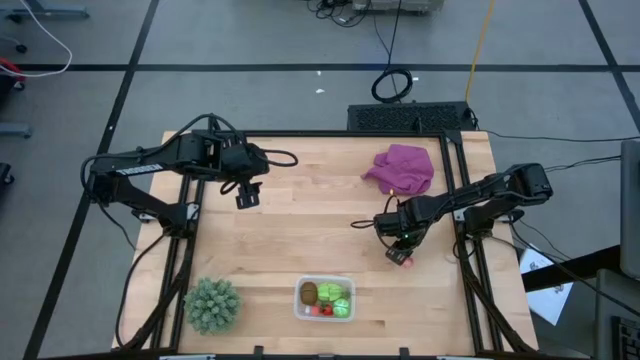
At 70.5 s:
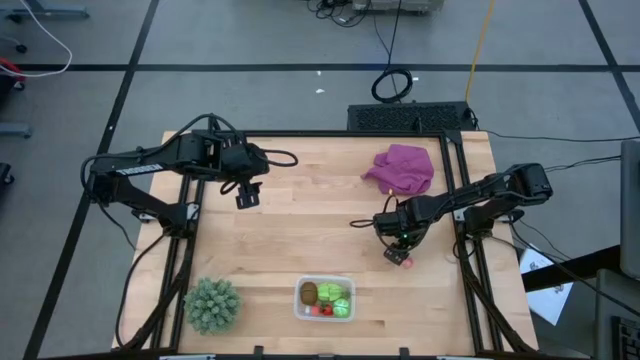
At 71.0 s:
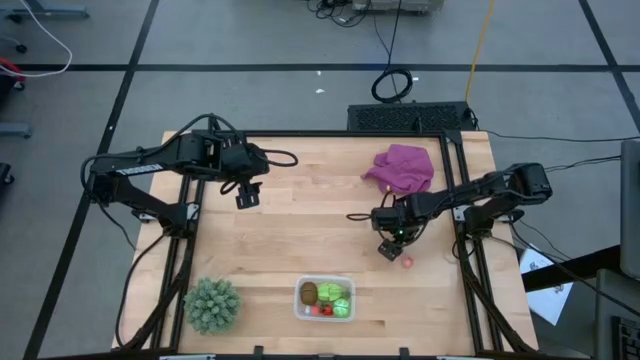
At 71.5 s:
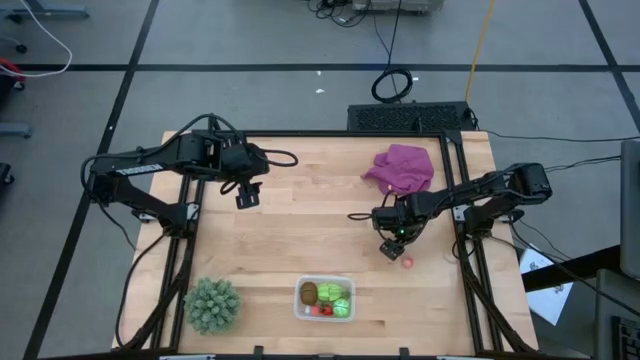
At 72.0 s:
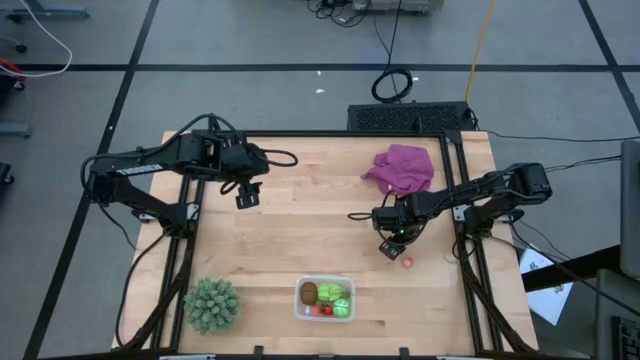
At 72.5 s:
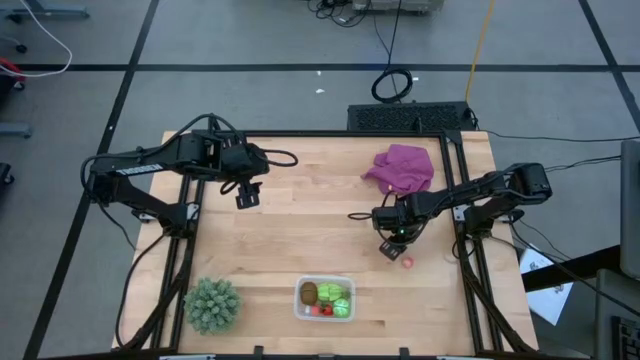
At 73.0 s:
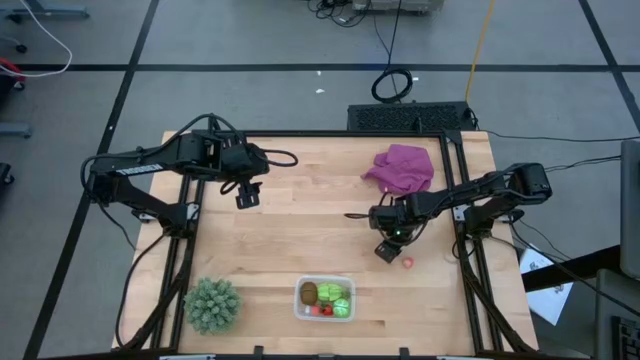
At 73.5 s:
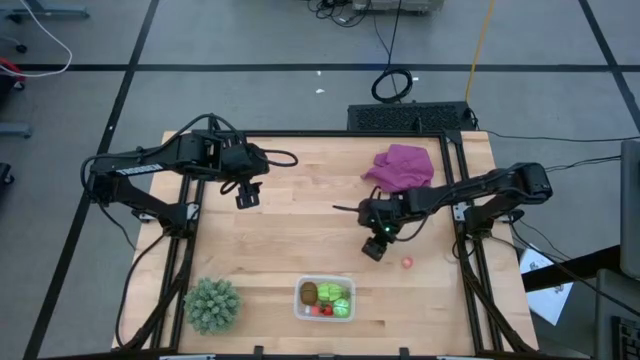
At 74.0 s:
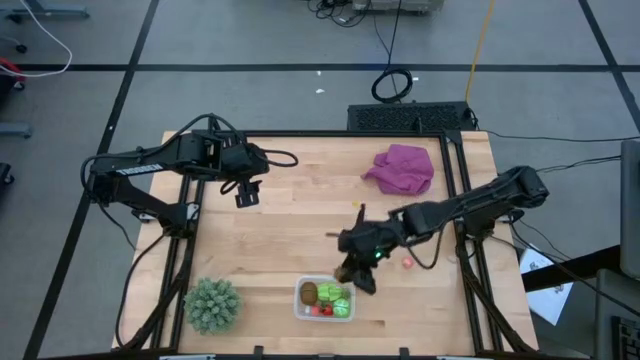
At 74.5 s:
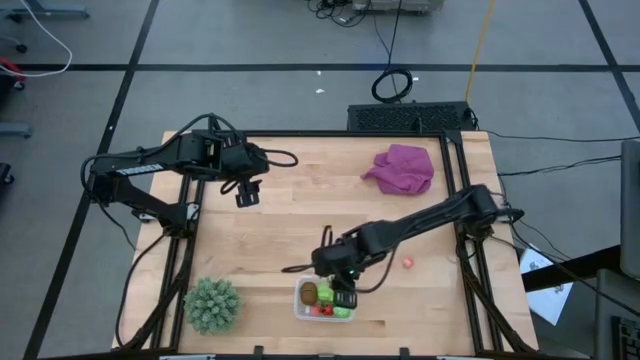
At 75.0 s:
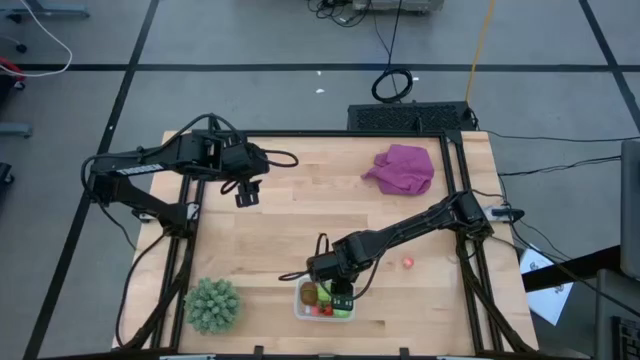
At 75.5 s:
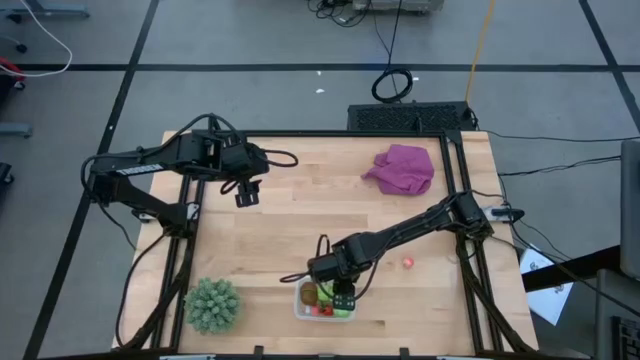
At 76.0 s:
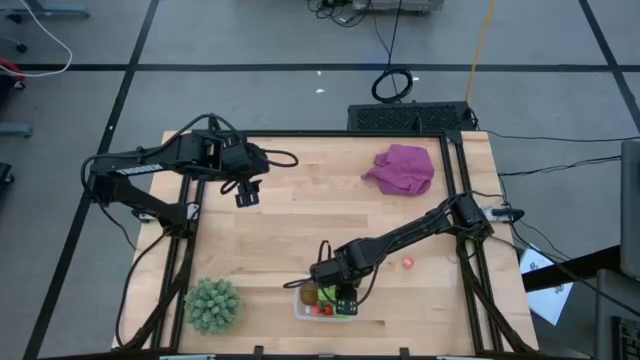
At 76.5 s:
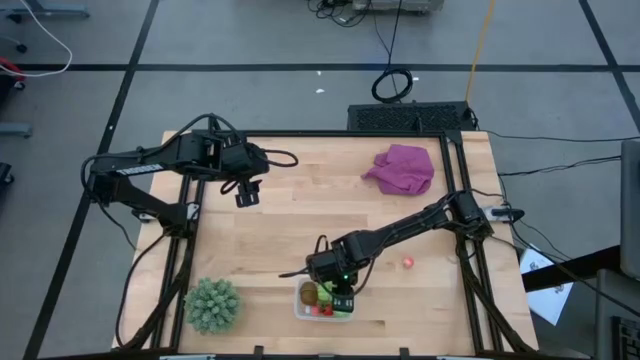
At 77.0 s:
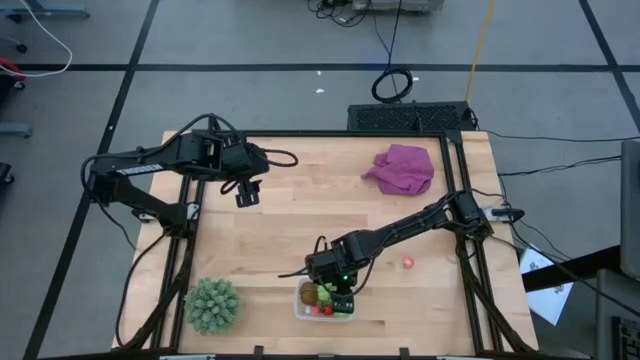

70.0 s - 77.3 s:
Task: Pick and placing Produce into tupperware
Put the strawberry into the transparent bin

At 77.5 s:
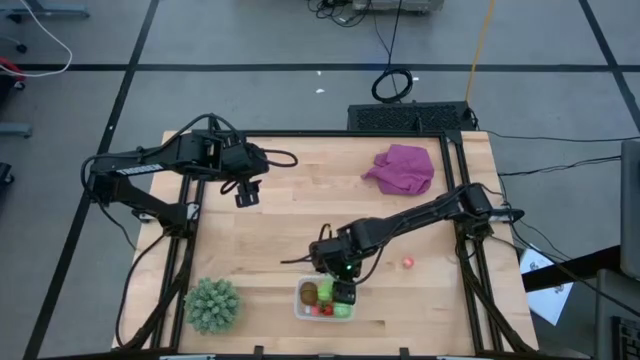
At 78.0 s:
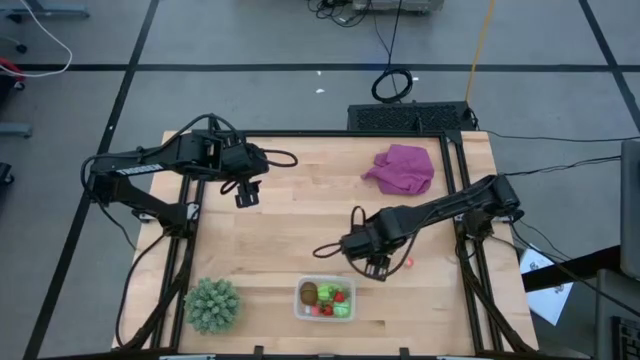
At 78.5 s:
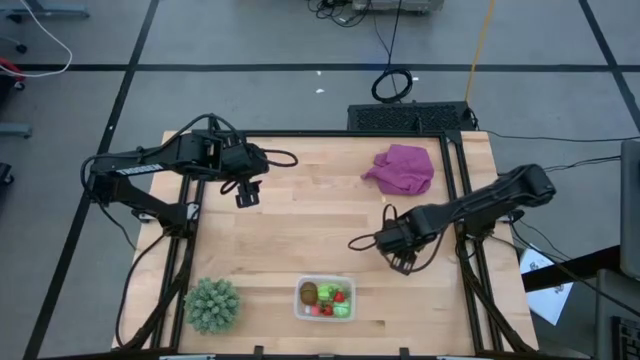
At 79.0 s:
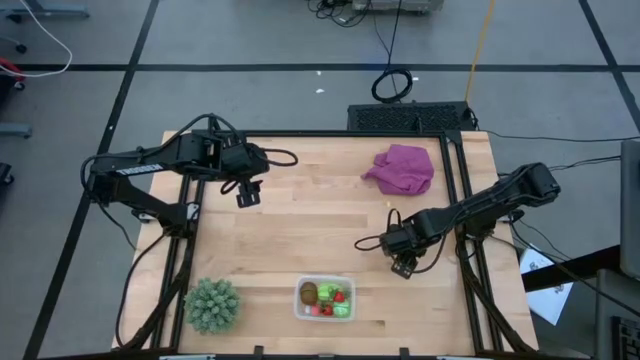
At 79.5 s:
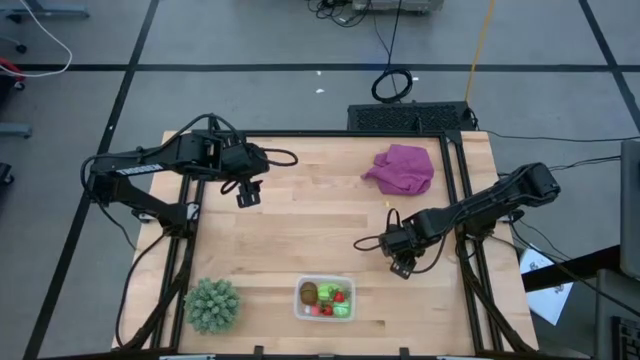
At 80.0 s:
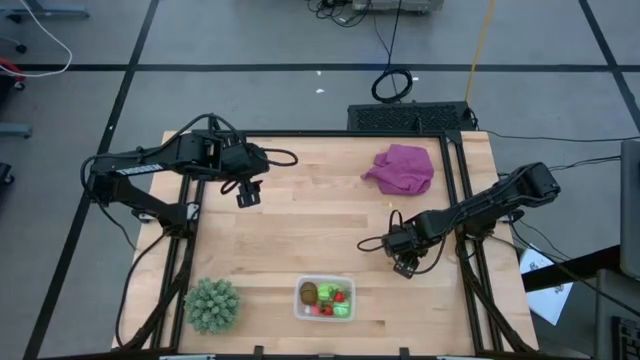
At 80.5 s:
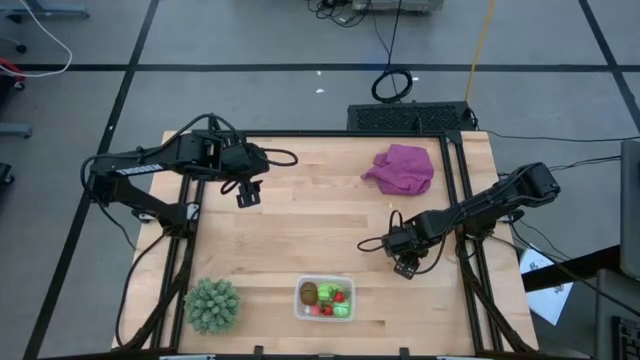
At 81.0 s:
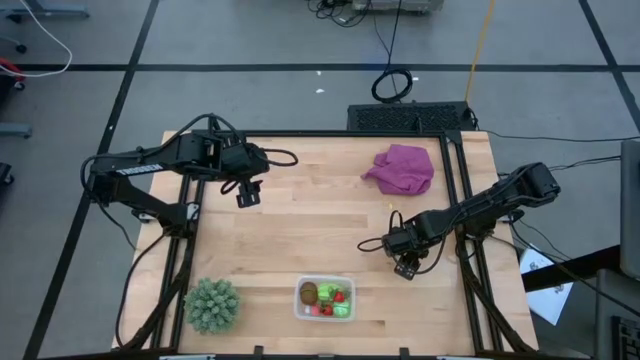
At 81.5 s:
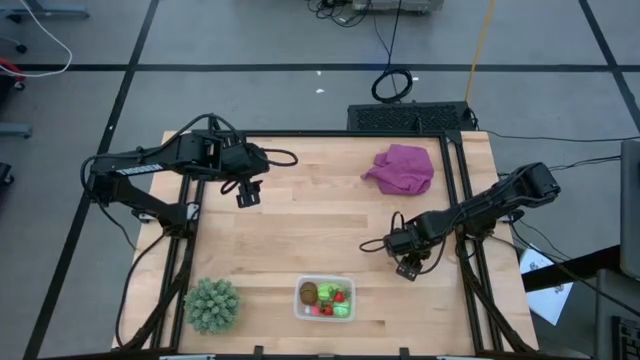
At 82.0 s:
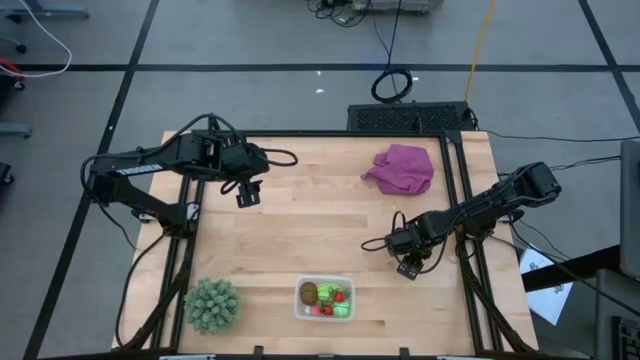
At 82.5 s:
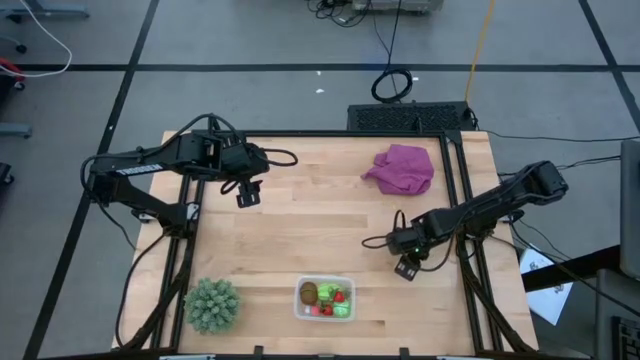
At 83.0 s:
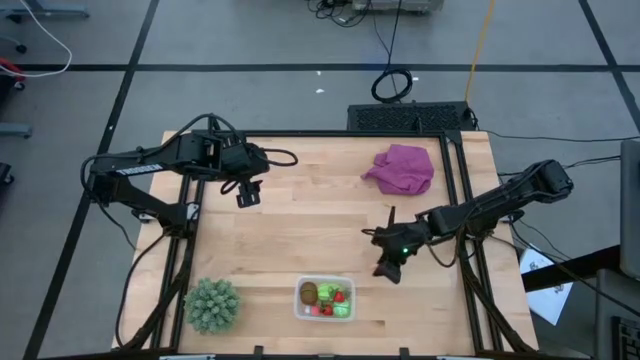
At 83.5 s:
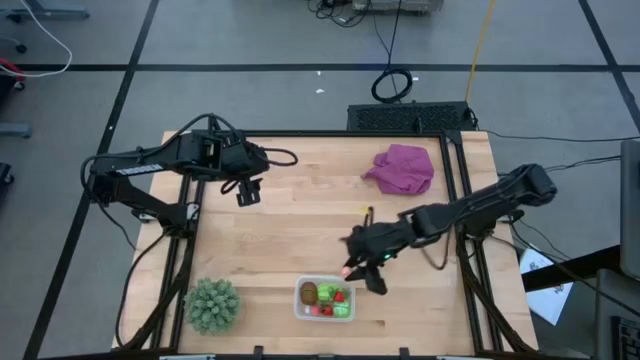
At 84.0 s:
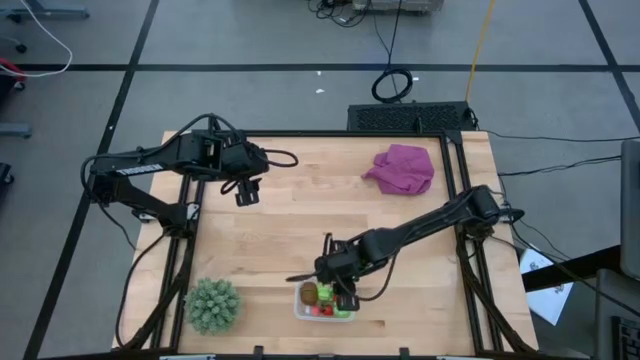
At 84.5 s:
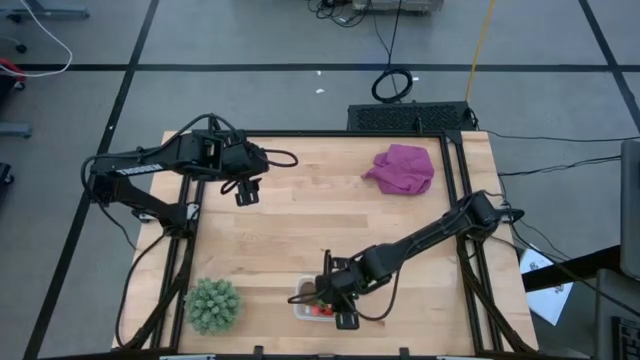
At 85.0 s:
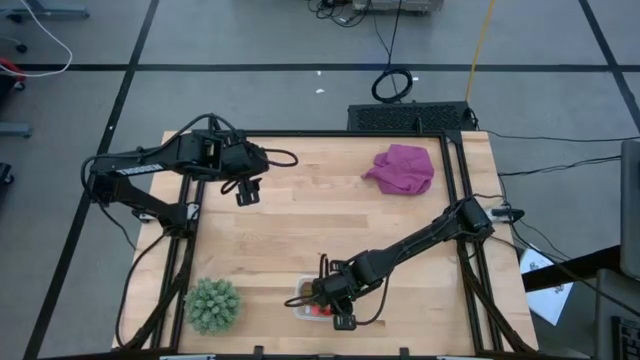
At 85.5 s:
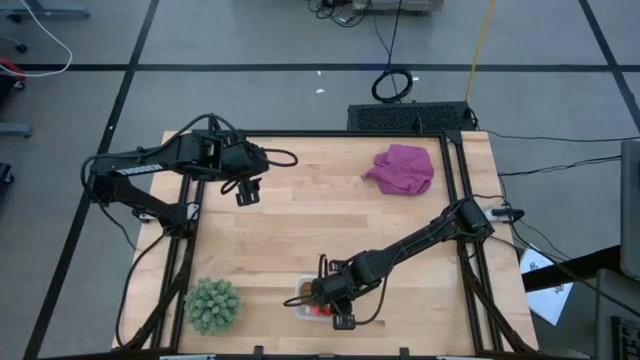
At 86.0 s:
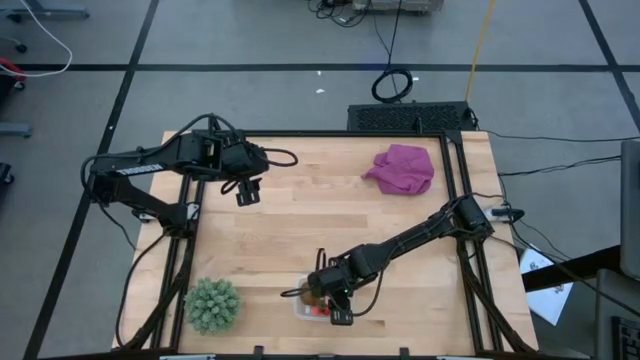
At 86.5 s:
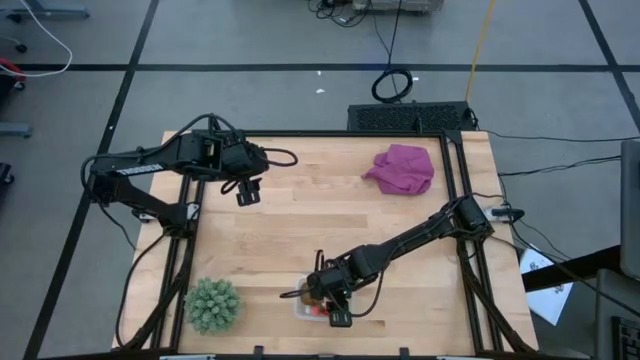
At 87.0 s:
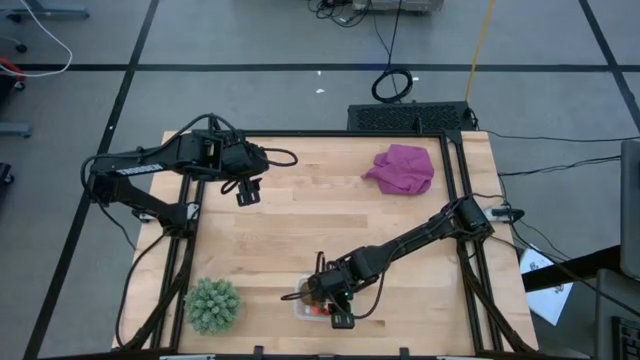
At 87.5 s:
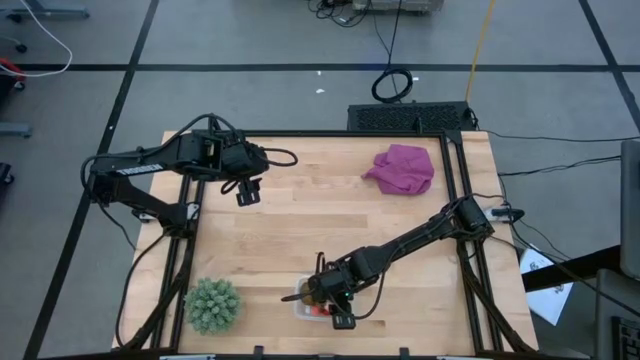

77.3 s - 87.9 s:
Put the pink peach into the transparent bin

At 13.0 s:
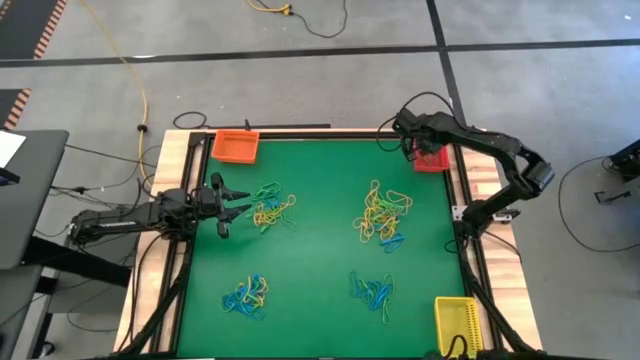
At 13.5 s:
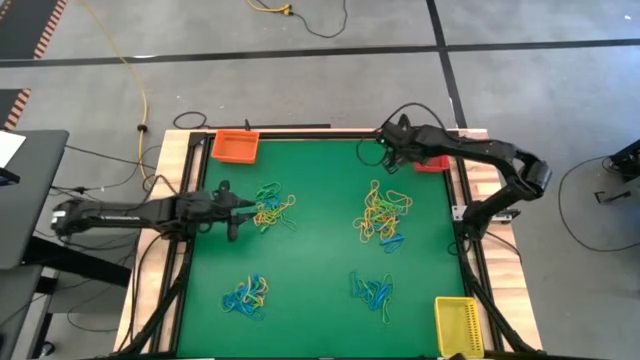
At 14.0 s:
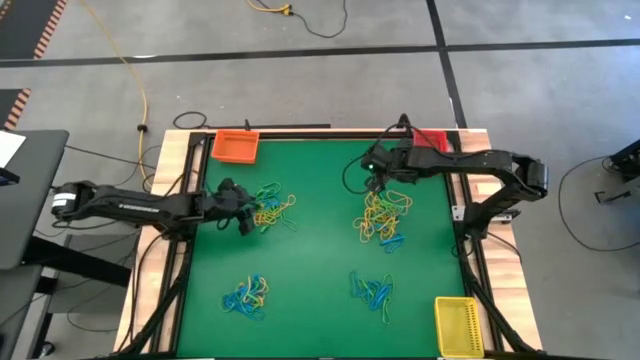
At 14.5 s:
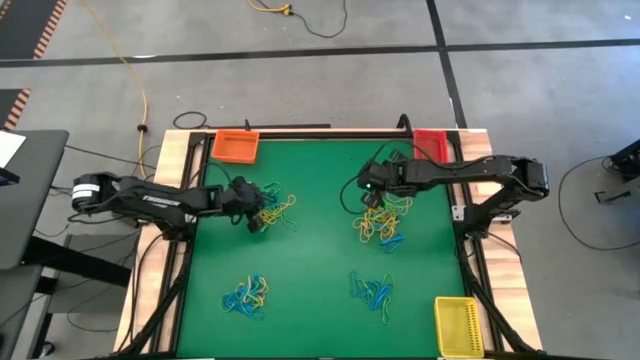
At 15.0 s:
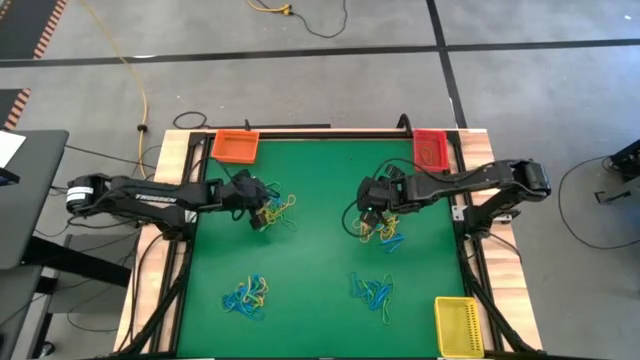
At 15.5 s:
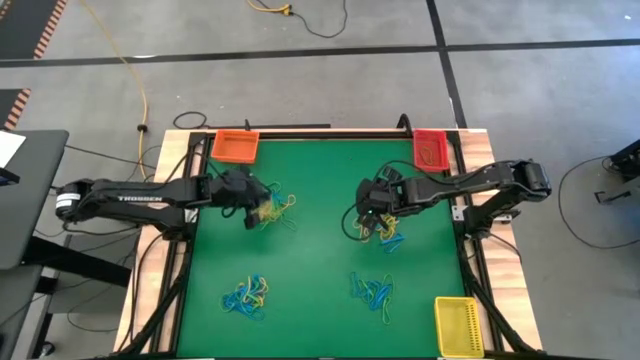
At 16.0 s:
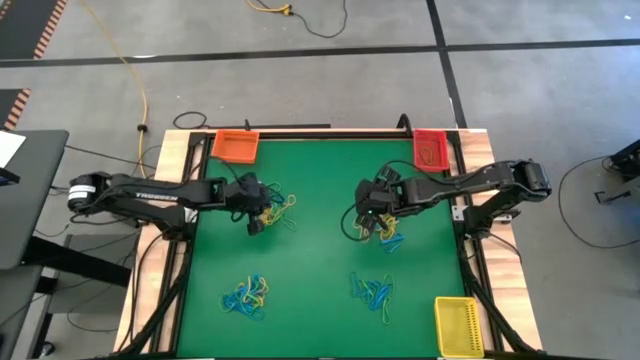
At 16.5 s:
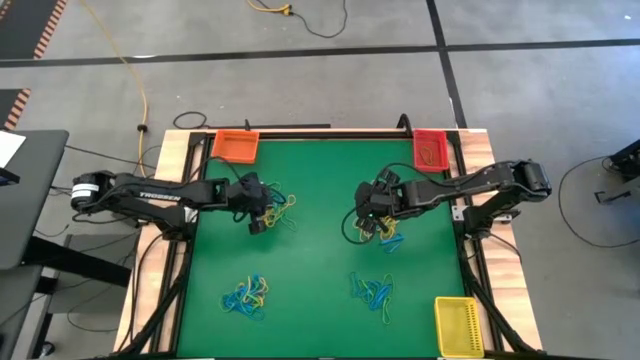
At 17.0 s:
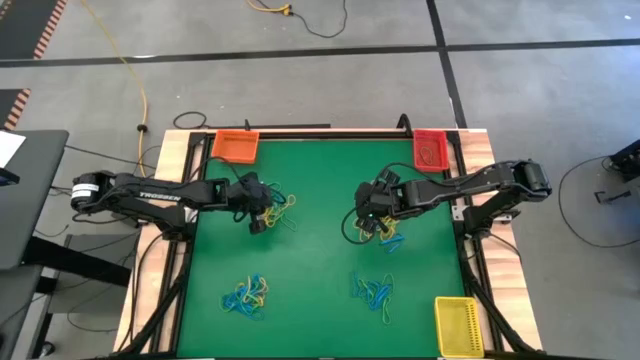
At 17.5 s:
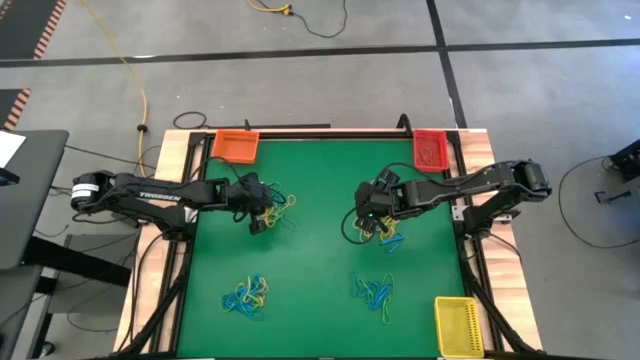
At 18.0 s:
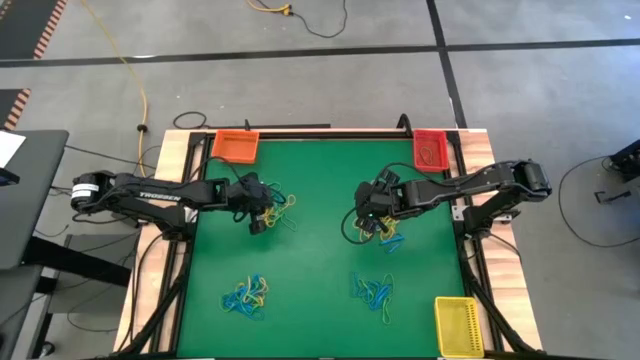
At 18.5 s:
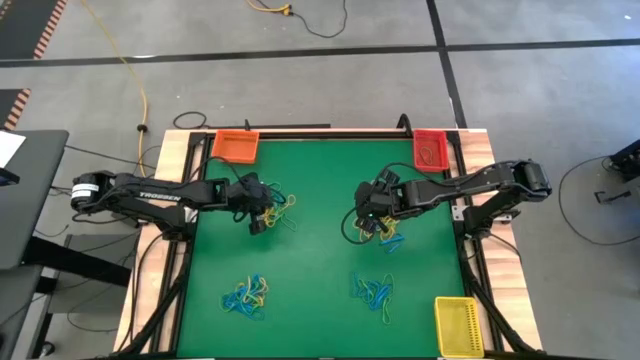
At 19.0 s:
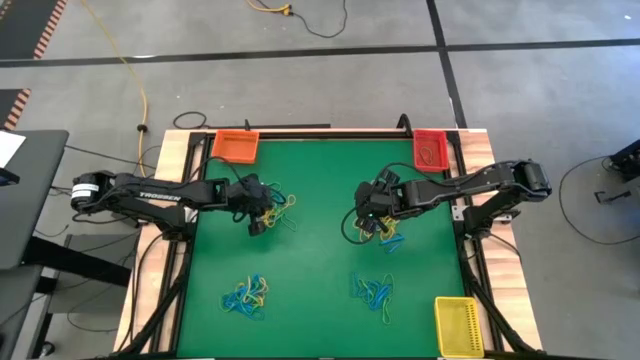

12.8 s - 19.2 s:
Task: Sort rubber bands into baskets
Put the top left blue rubber band into the orange bin
